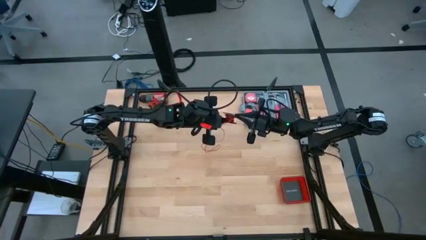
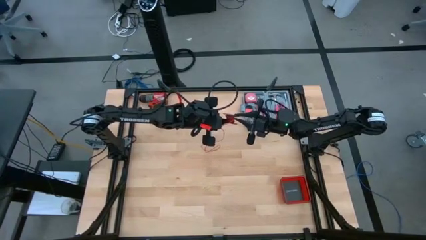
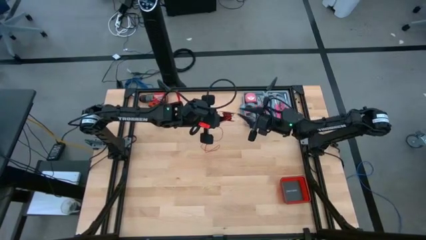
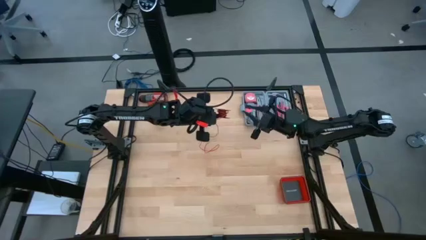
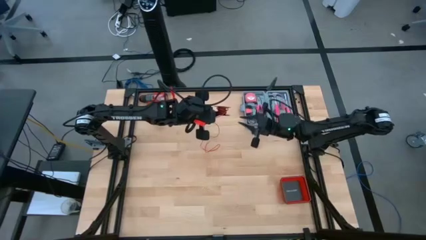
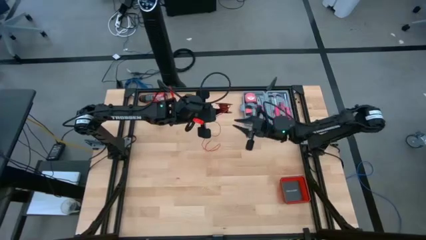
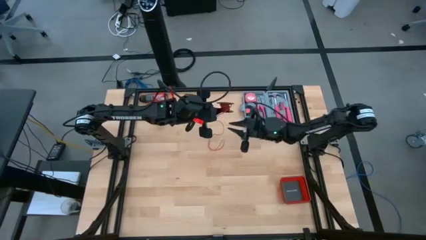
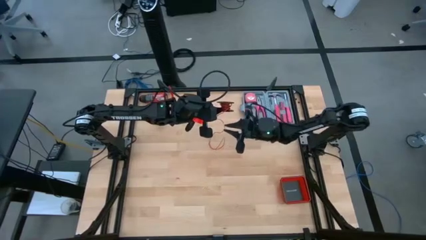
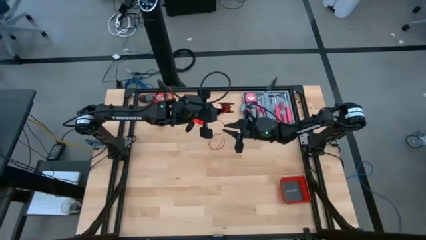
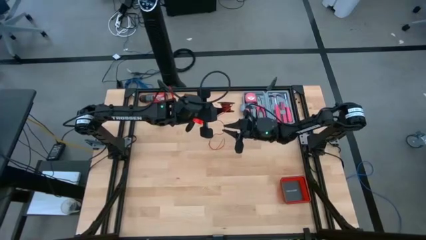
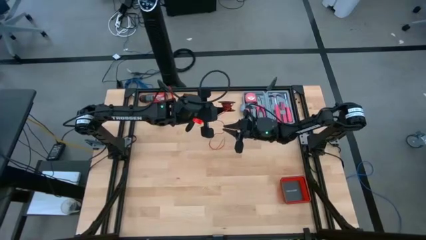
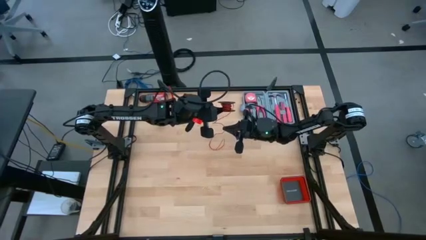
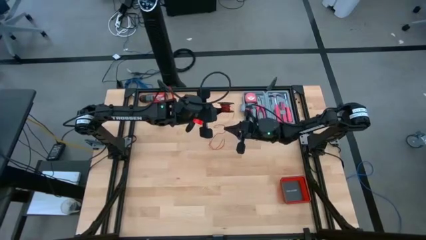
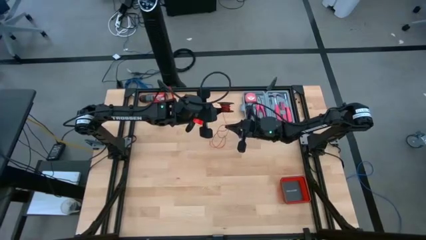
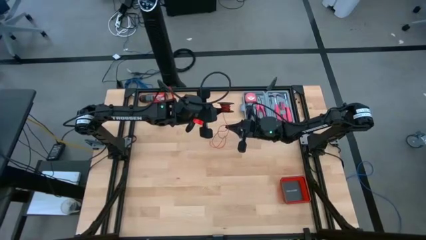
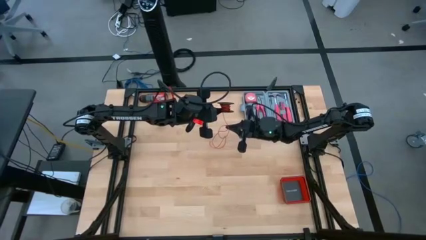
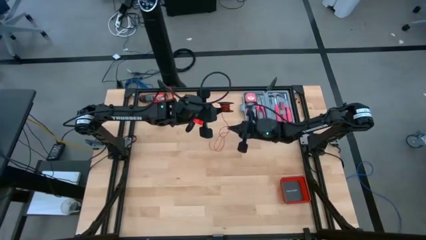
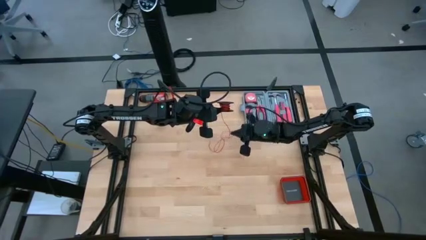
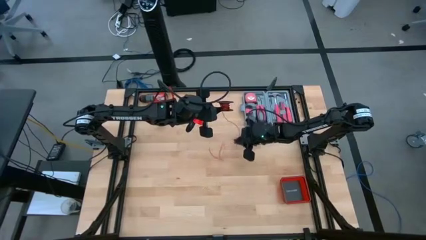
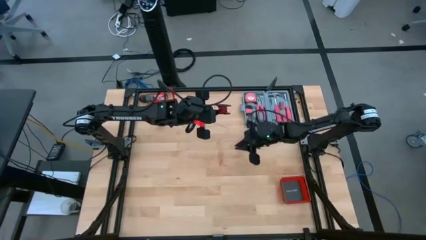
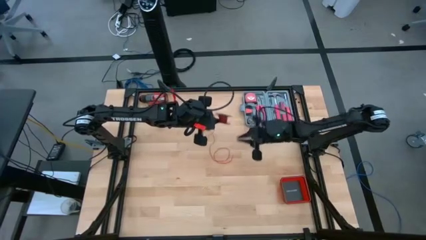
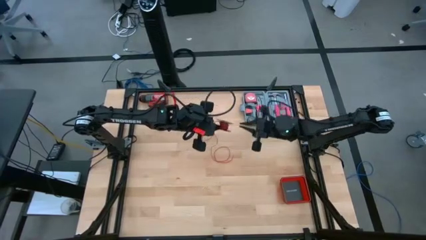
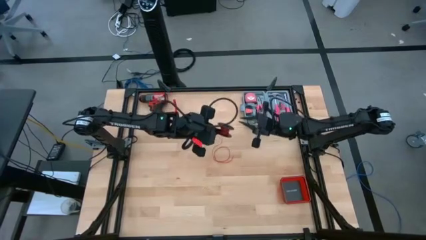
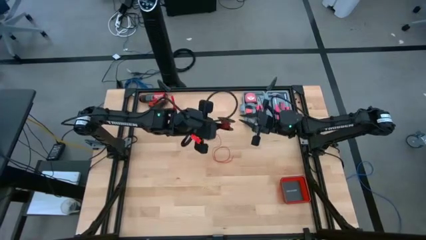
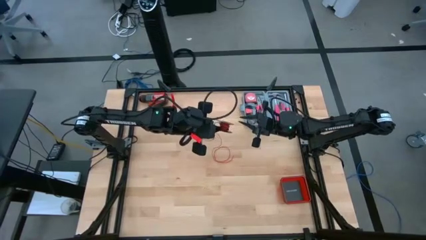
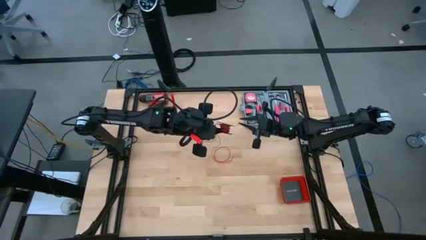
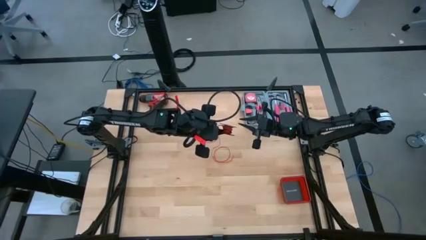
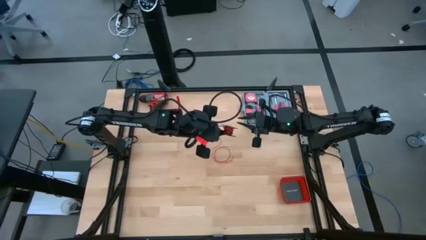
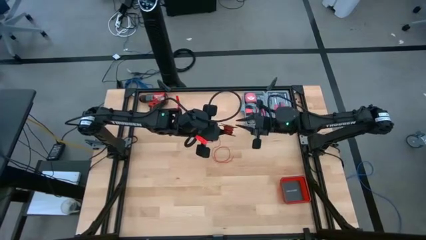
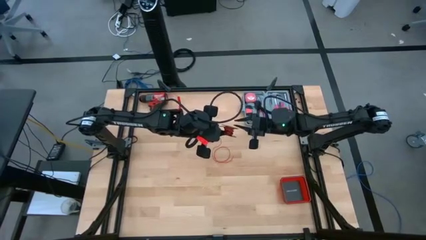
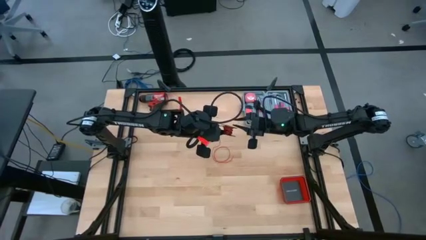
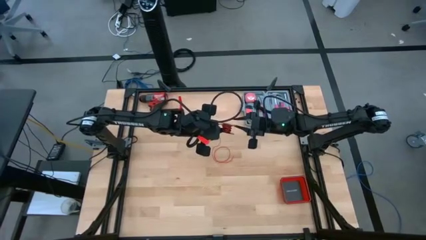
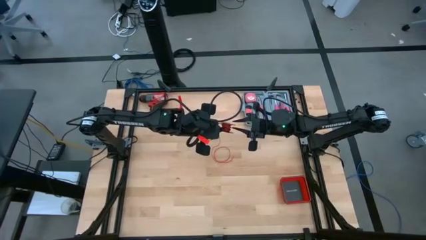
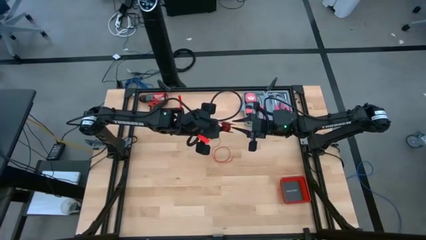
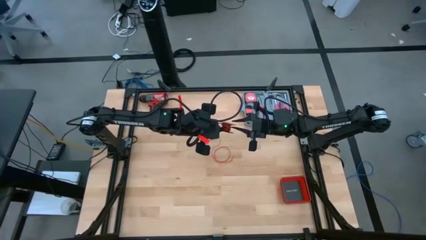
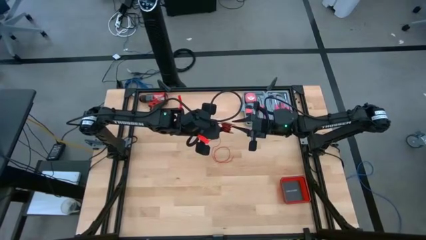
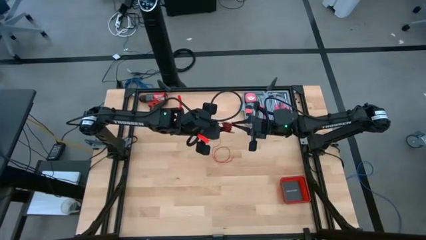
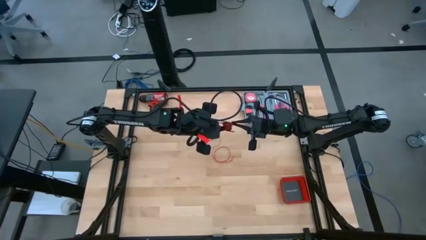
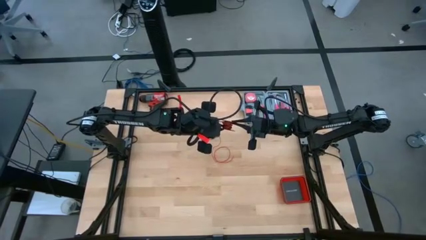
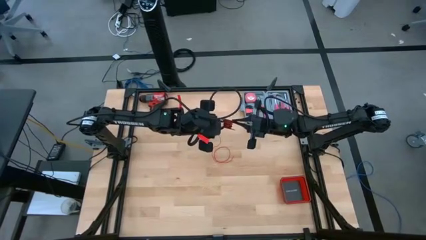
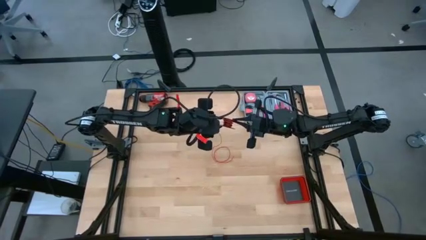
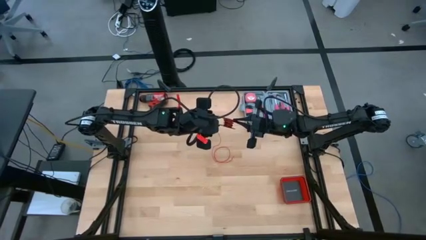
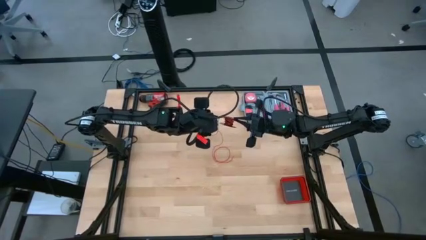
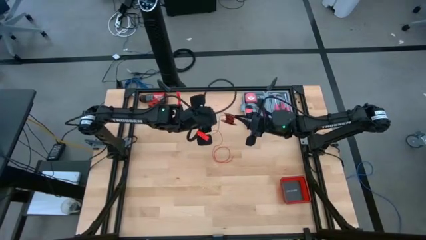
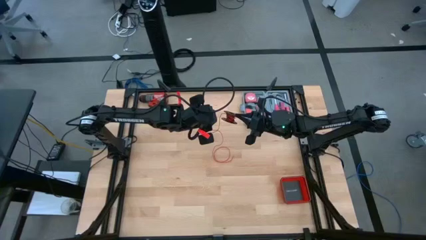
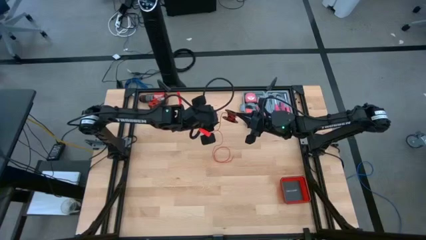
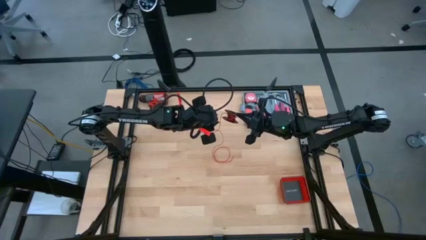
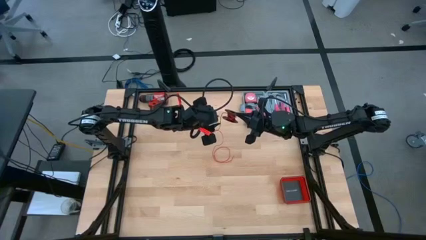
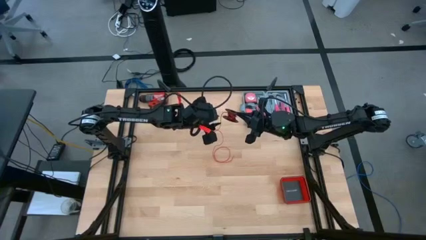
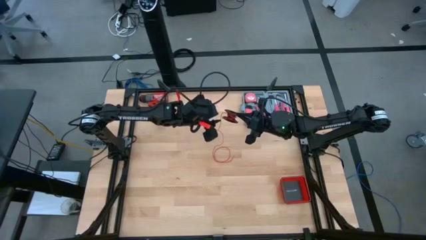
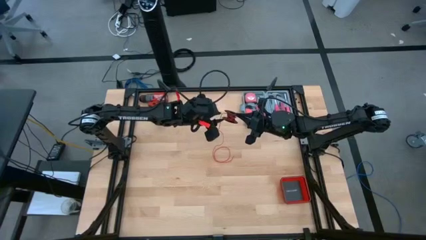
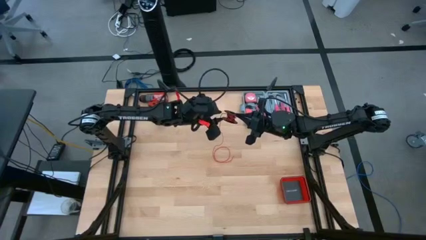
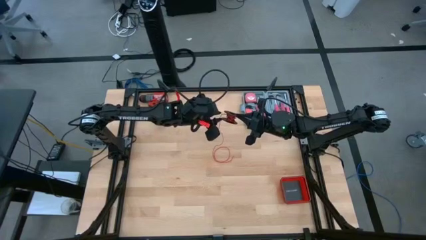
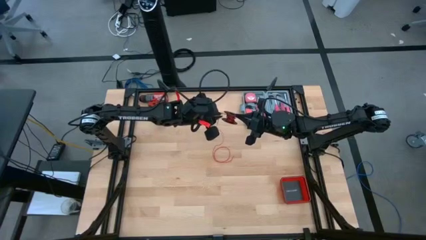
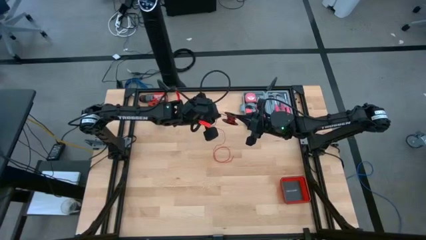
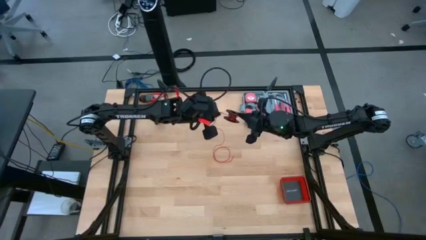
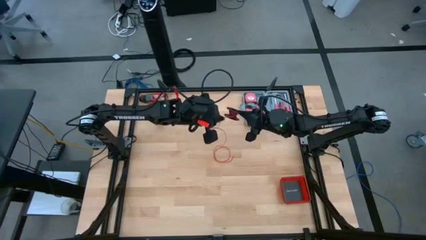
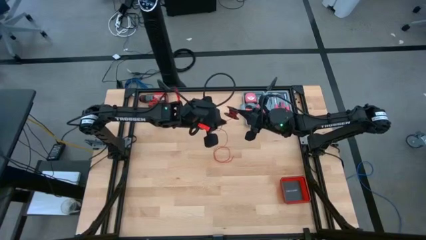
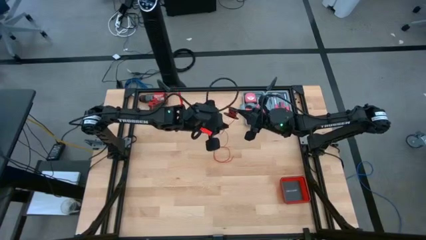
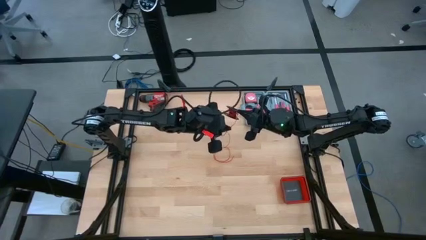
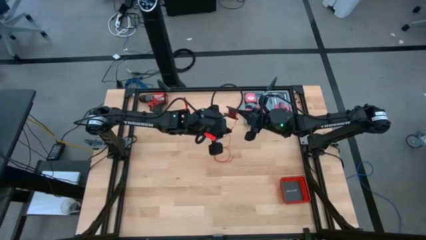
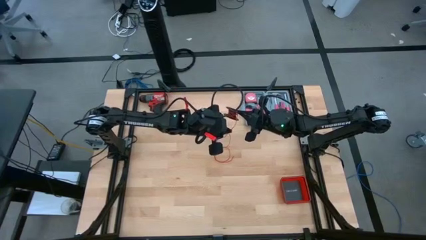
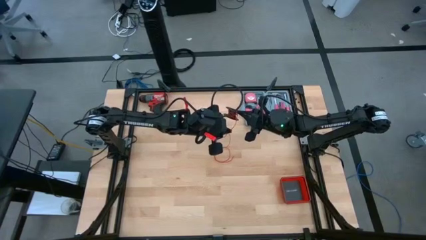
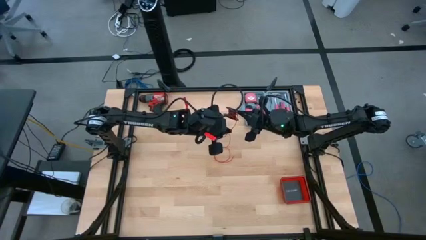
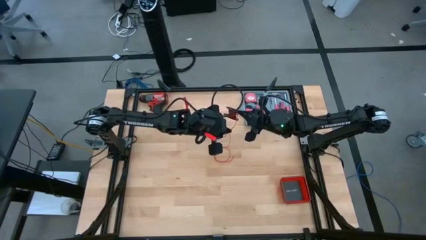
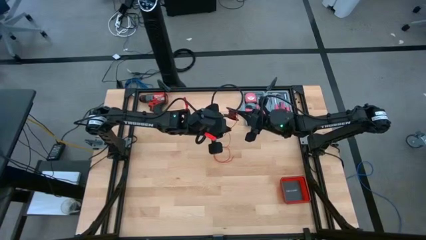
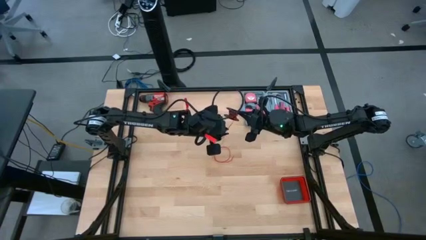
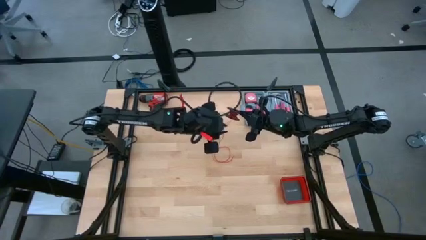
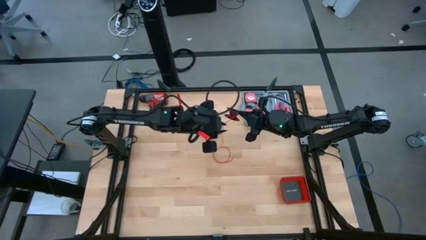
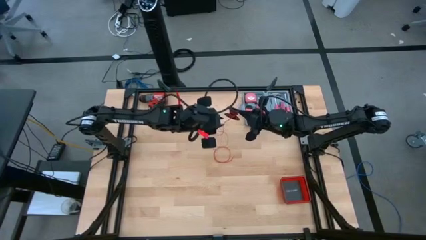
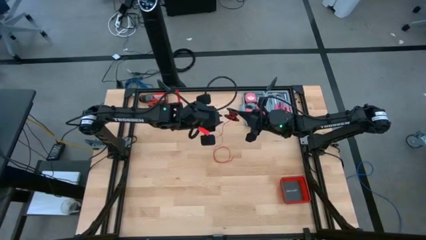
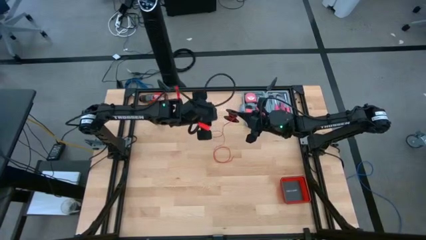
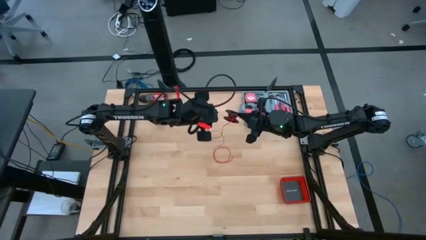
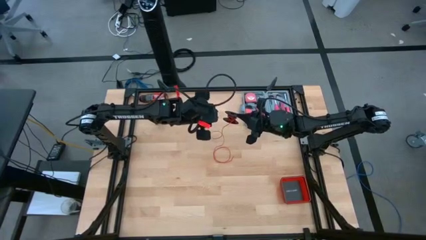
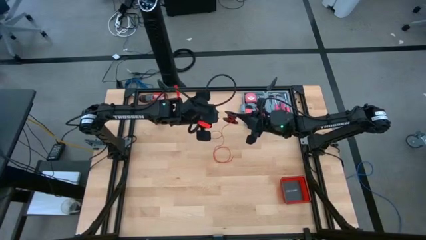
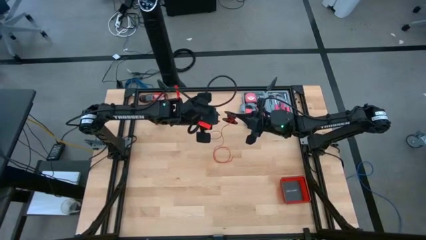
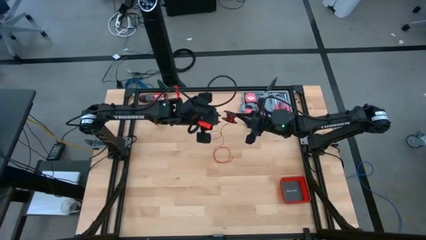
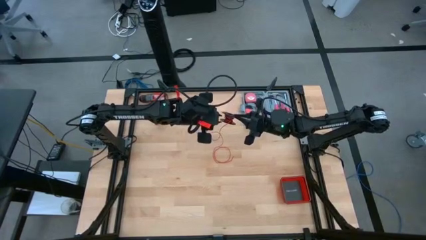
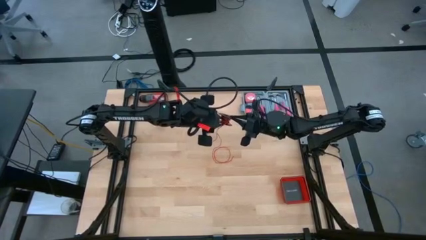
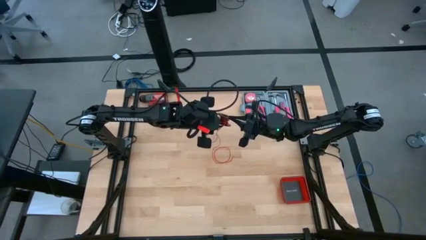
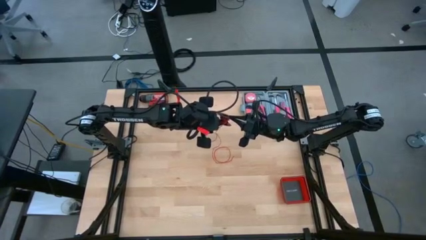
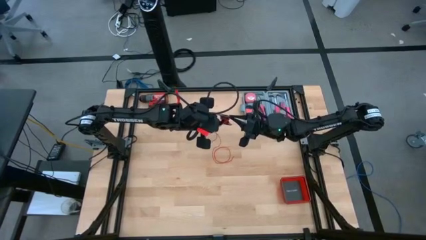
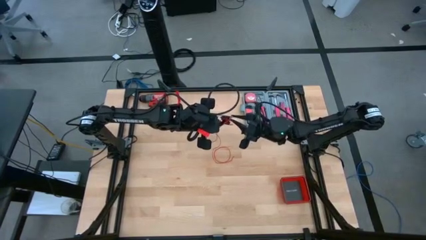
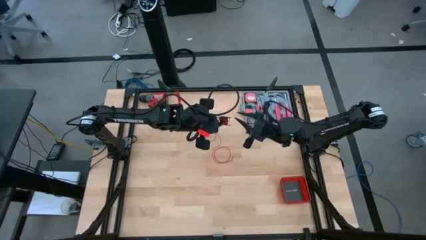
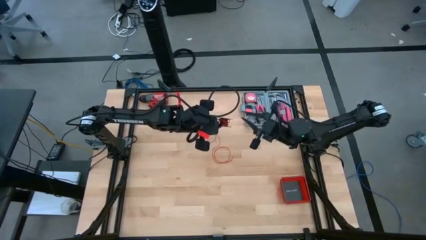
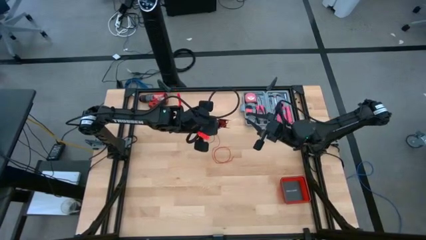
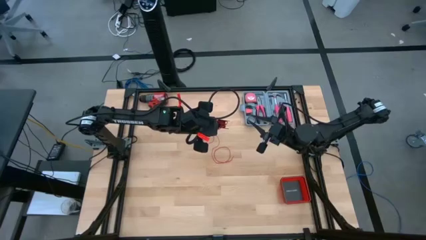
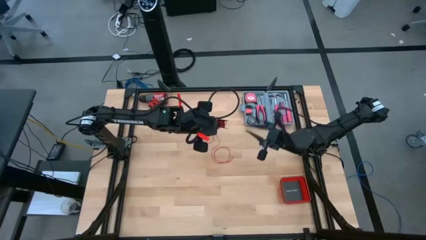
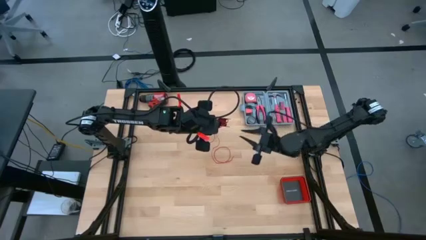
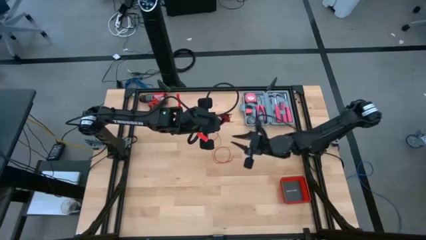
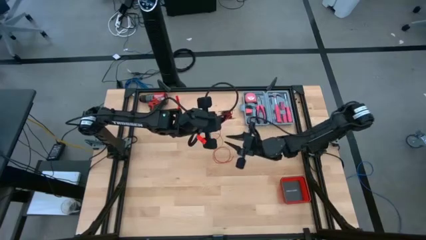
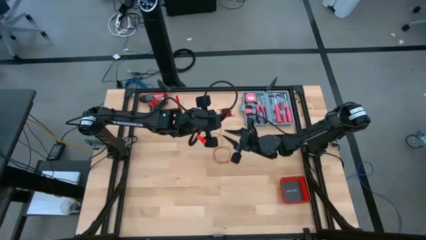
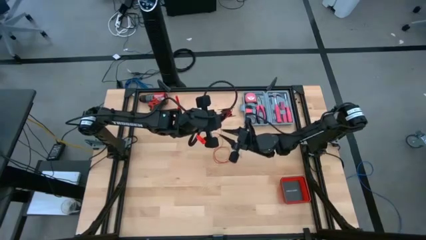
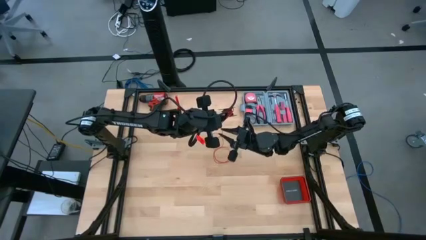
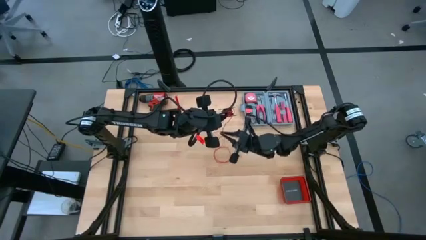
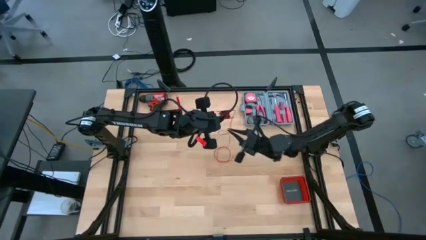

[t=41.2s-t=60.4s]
Task: Coil cords
Uncoil the red wire from the black spool
